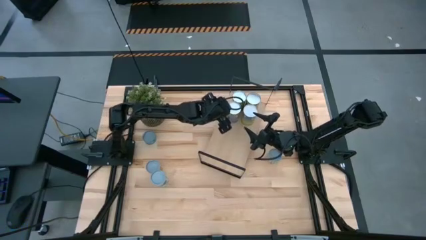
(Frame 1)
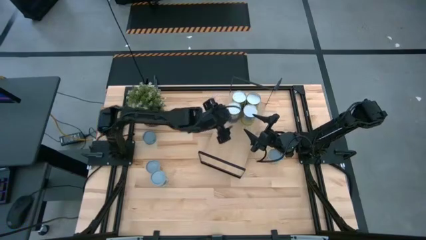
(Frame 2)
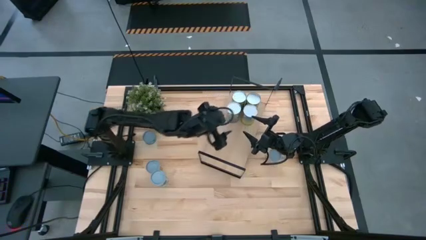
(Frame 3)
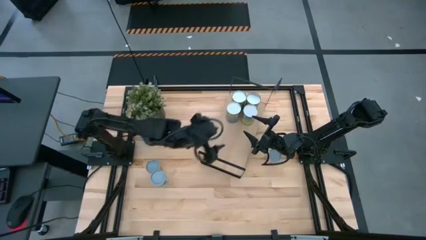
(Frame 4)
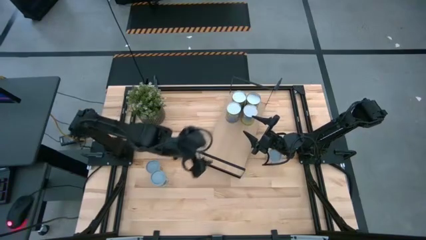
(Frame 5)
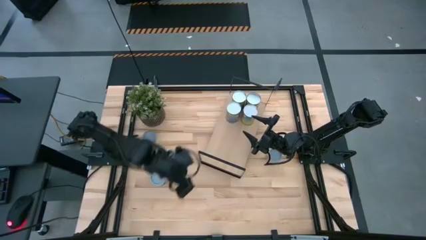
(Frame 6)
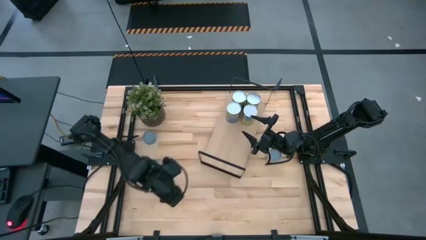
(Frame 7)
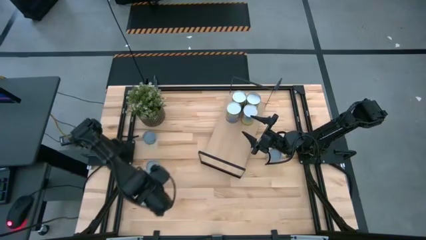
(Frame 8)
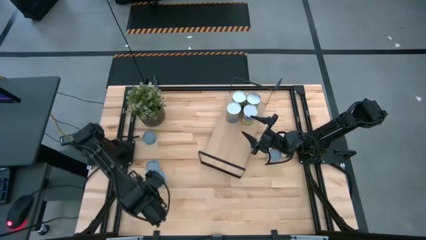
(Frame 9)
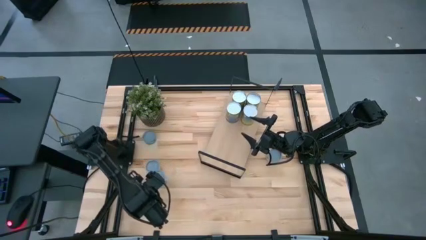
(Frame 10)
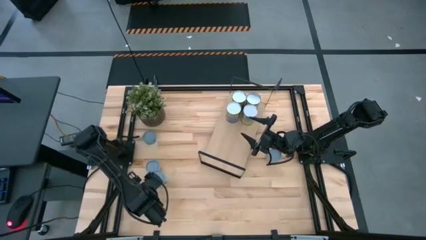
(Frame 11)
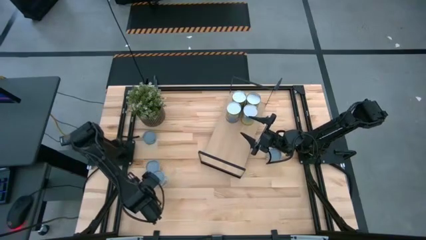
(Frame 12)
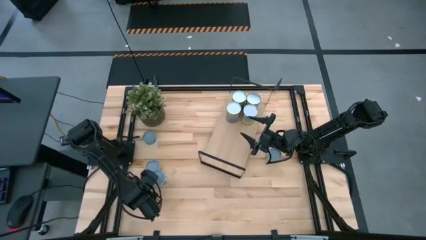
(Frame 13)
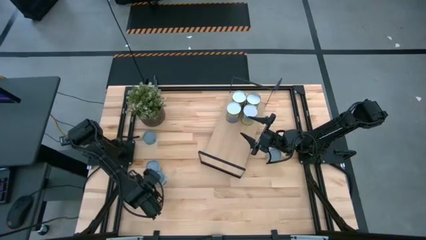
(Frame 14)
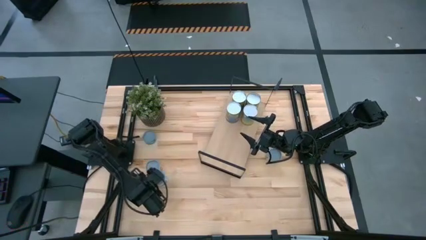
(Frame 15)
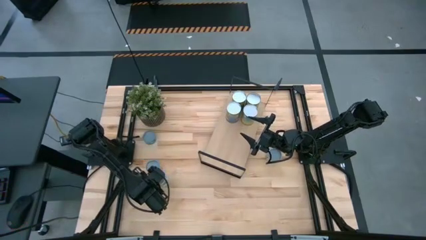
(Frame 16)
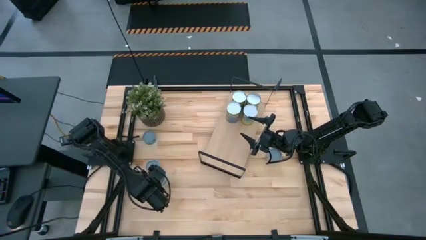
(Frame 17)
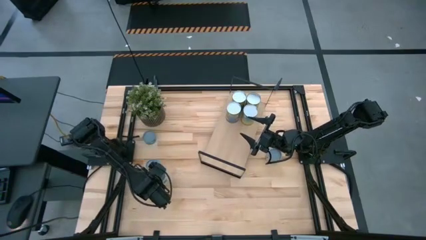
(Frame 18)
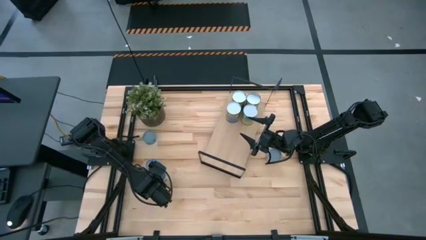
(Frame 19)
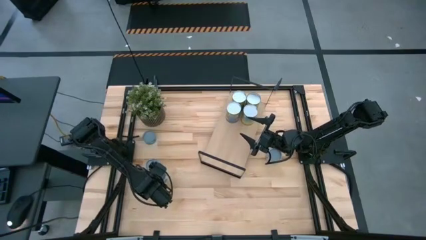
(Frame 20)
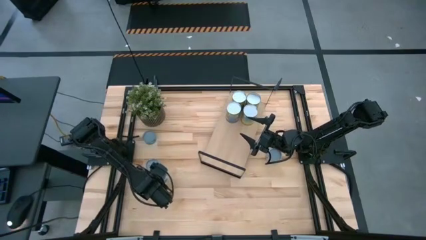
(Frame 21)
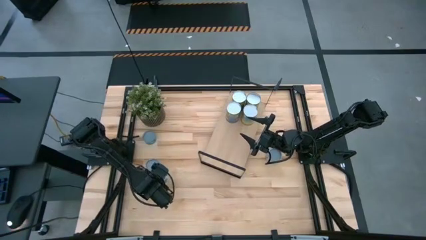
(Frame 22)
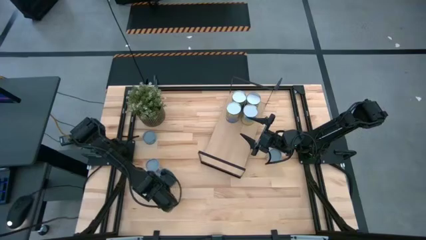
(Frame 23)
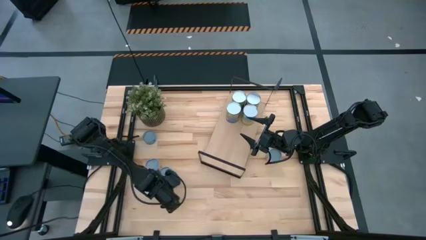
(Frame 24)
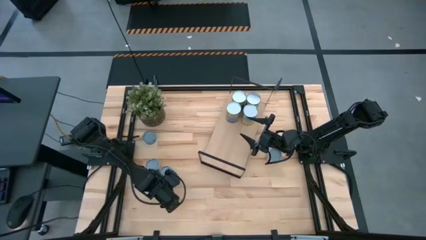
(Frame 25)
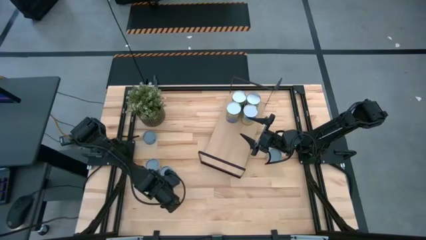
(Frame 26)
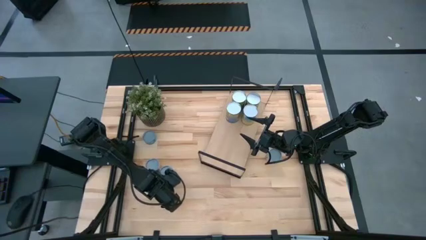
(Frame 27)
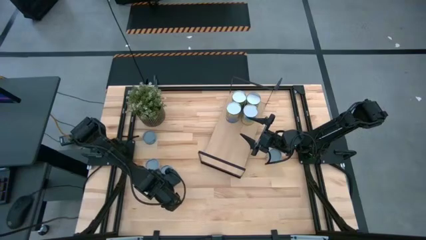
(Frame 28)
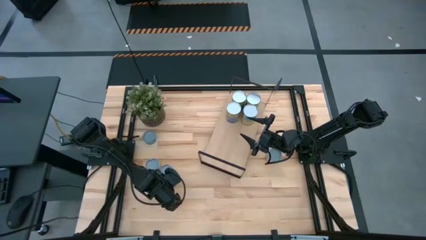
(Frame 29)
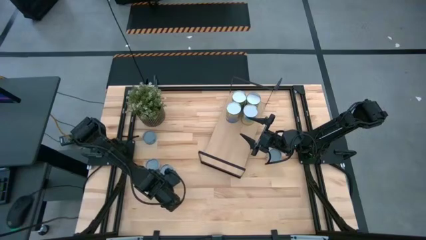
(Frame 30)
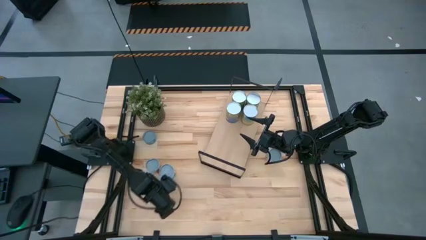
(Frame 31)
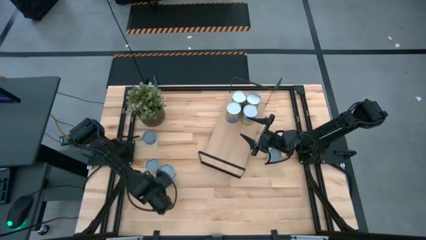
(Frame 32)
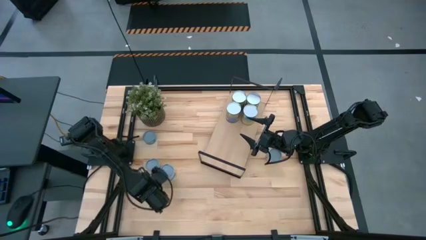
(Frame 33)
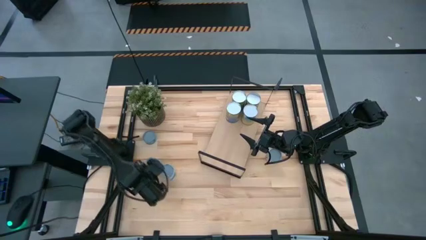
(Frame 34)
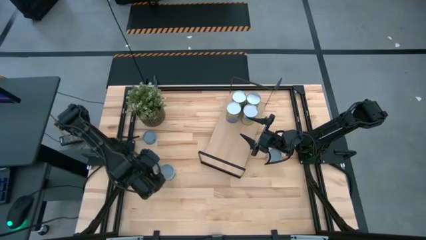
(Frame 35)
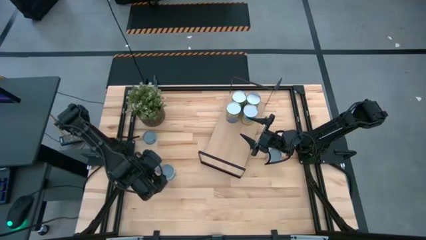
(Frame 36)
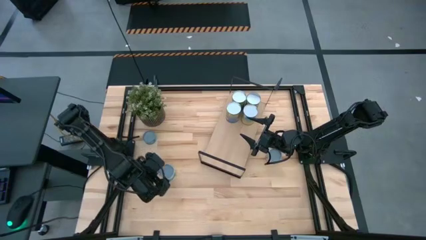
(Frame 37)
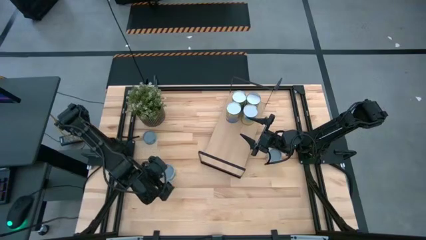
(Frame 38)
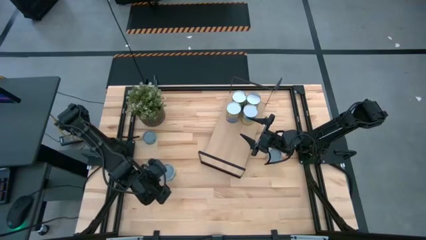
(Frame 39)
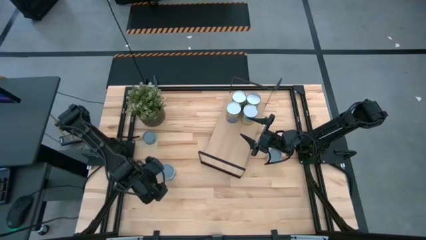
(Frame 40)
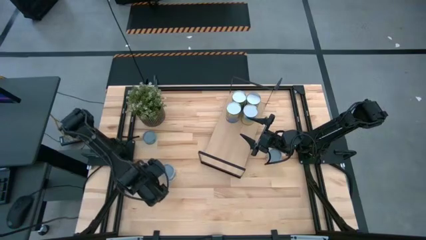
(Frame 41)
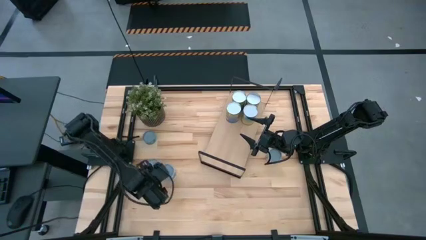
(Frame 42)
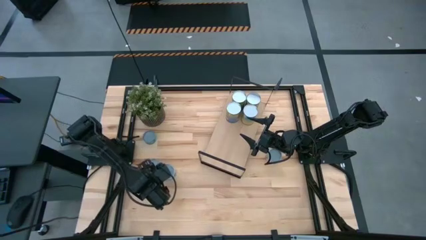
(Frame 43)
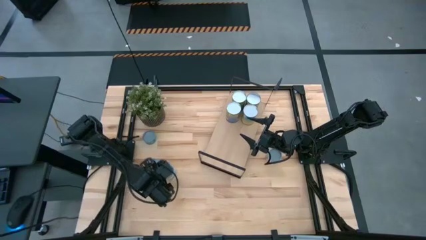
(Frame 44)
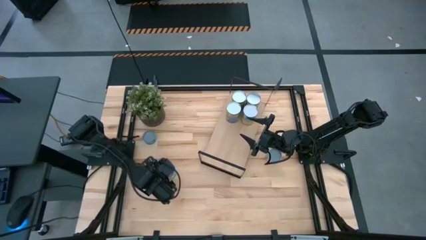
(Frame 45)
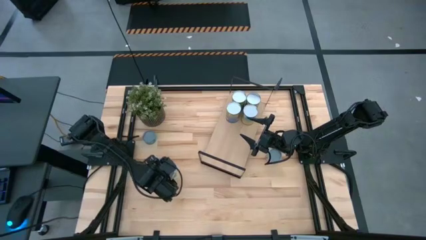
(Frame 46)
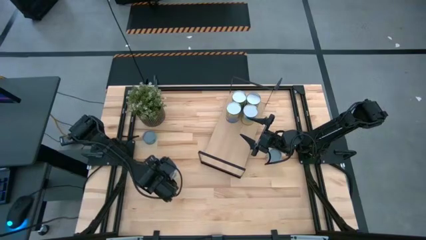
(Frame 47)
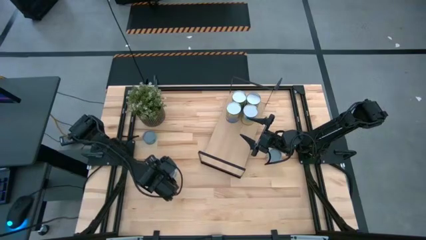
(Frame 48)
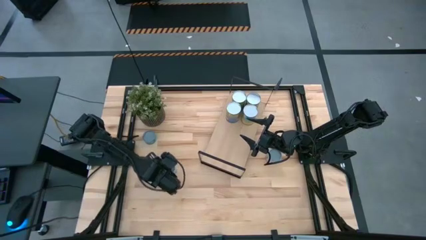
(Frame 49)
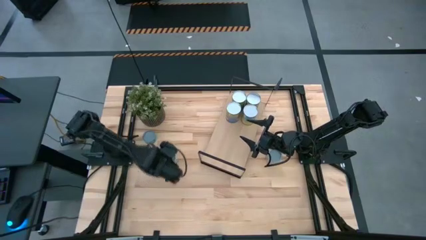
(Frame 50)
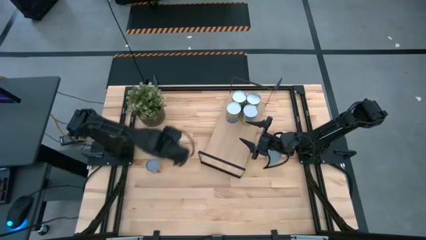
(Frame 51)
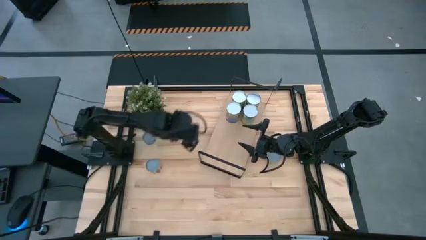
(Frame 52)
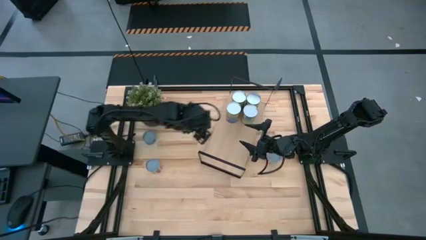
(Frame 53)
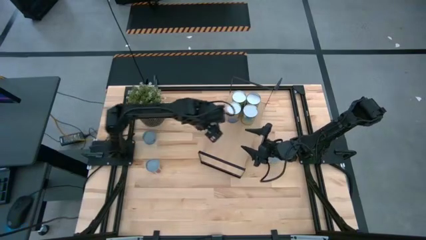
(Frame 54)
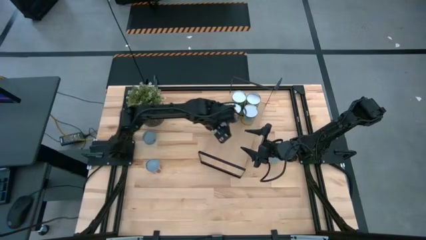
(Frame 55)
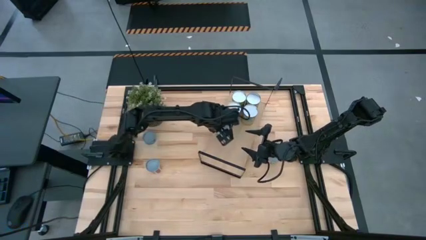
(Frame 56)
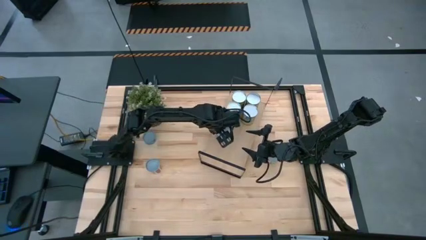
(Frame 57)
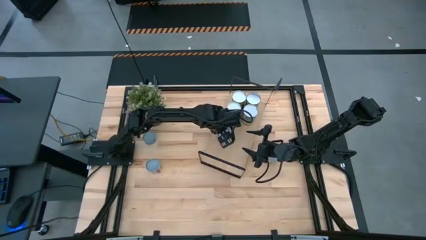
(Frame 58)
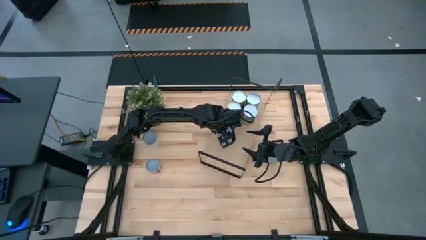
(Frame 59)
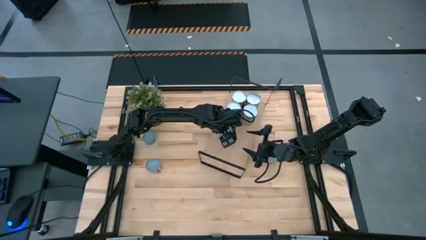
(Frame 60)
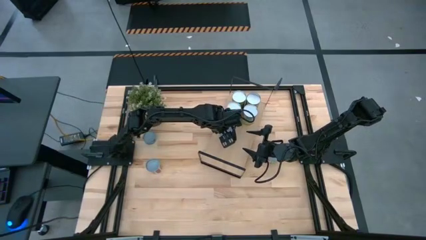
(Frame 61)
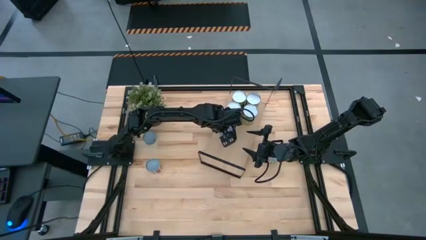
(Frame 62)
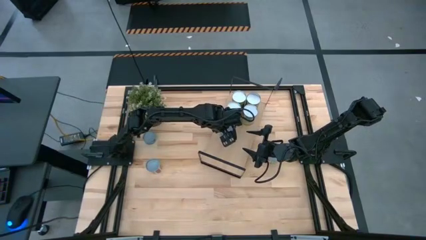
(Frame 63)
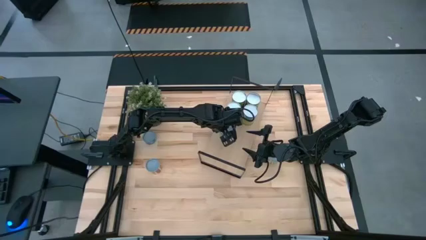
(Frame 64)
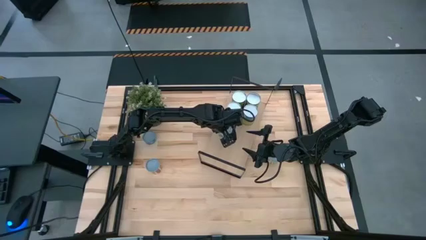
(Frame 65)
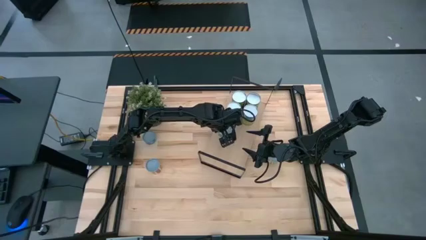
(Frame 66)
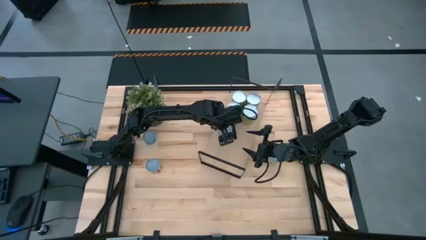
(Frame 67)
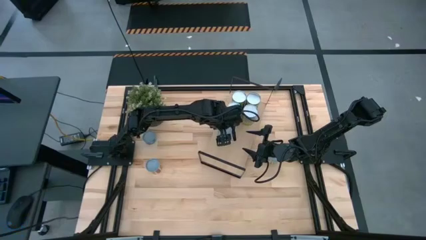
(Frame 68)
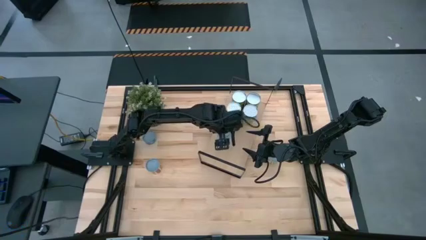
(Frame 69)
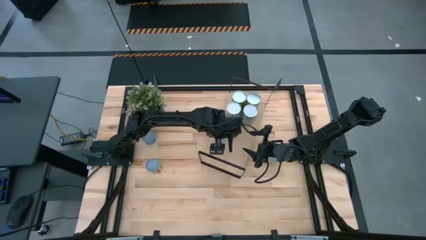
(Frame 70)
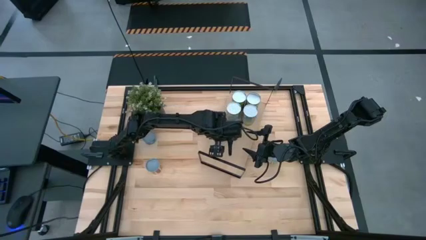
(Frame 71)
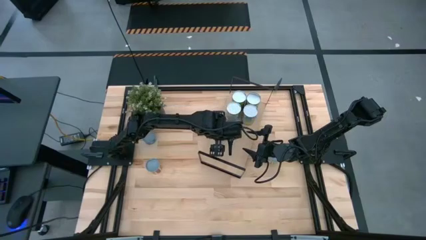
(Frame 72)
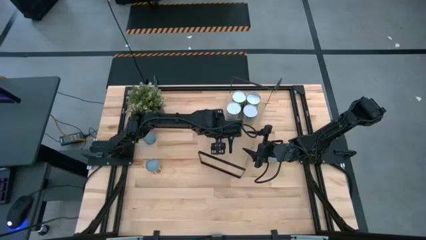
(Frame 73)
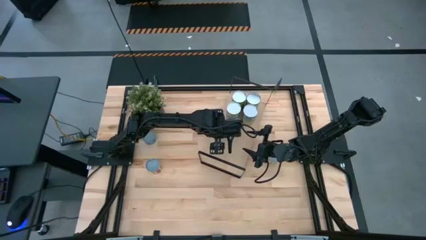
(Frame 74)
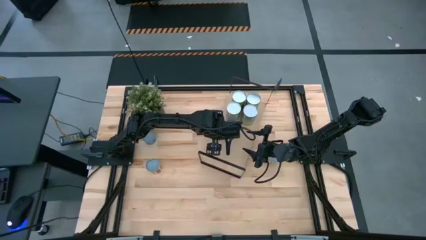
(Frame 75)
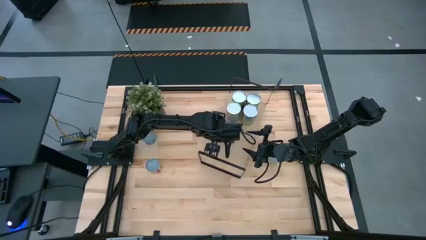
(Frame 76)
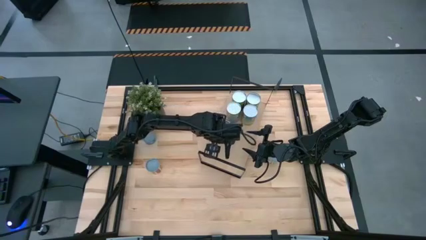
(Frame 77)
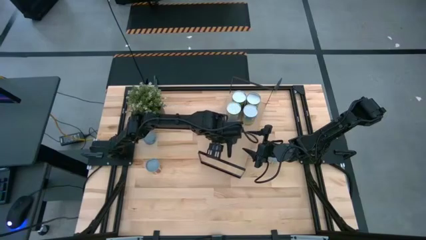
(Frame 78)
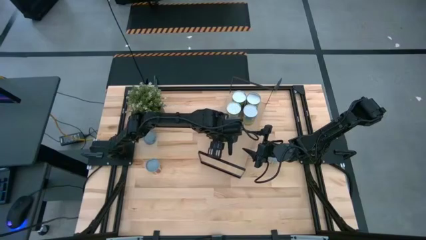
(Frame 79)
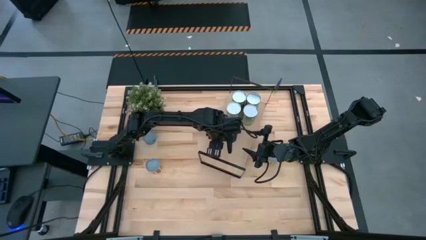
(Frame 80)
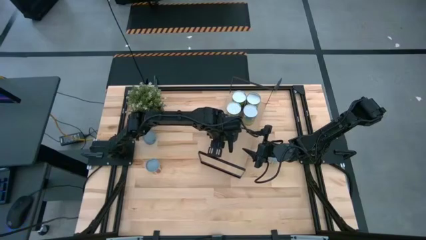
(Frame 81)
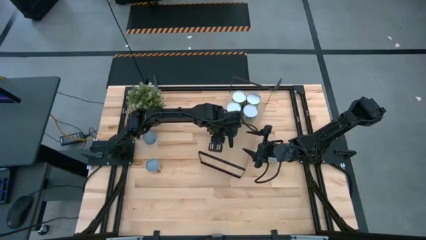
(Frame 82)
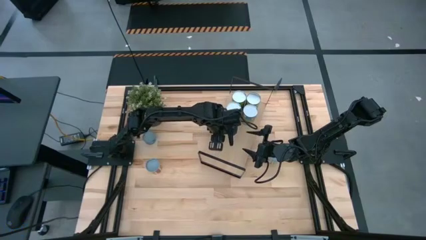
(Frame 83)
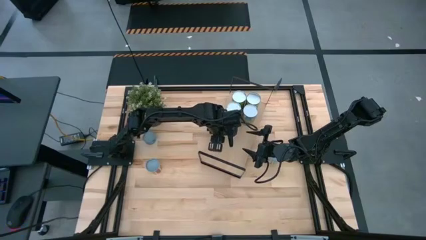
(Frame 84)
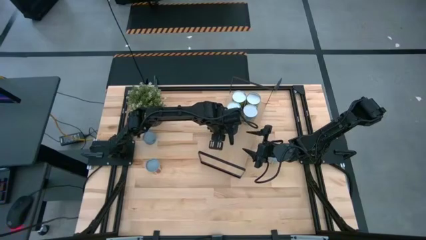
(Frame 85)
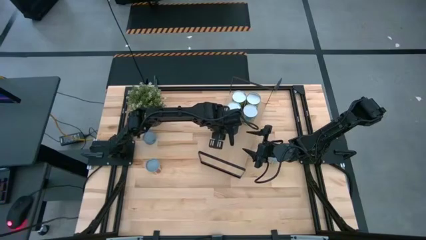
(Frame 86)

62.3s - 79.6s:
Task: Pick and place cans onto a shelf
Put the canned mixed vegetables on the shelf
